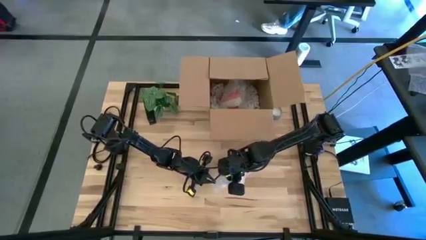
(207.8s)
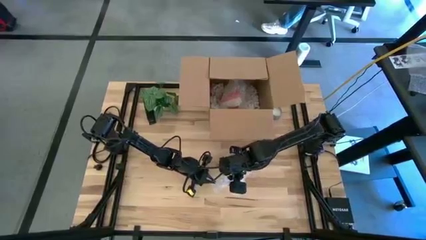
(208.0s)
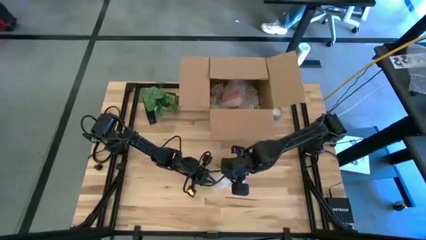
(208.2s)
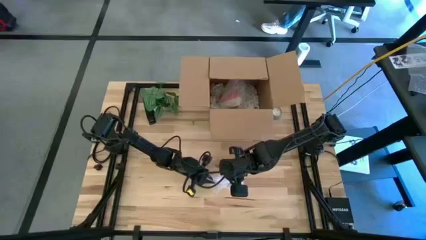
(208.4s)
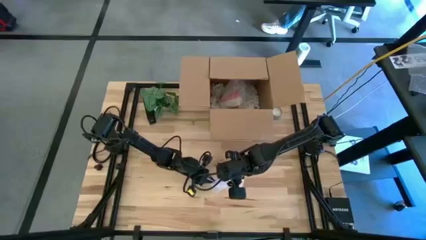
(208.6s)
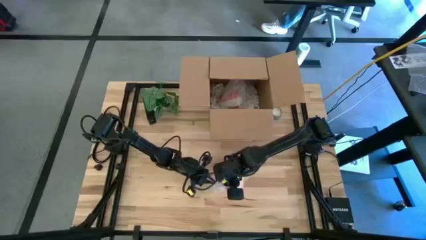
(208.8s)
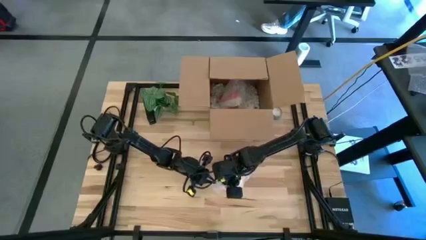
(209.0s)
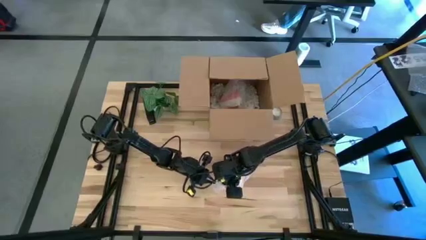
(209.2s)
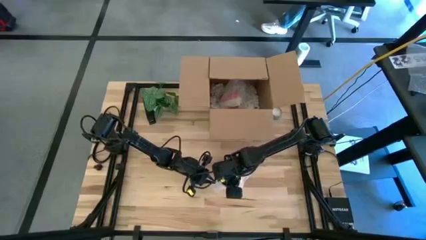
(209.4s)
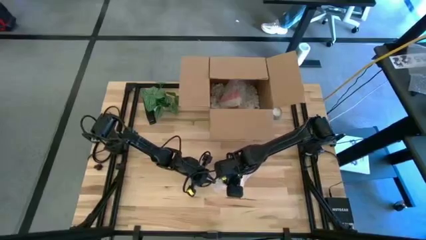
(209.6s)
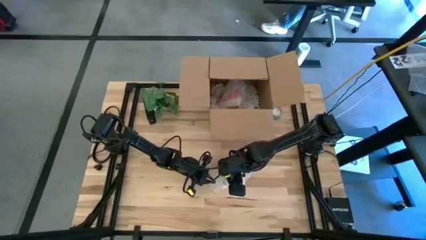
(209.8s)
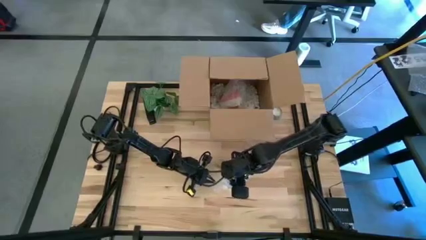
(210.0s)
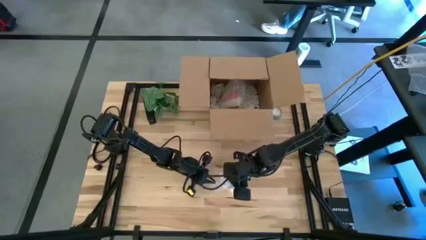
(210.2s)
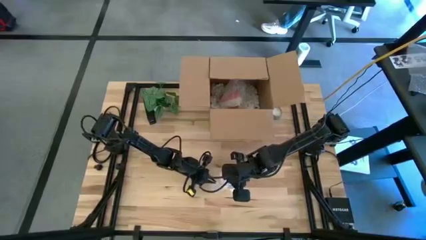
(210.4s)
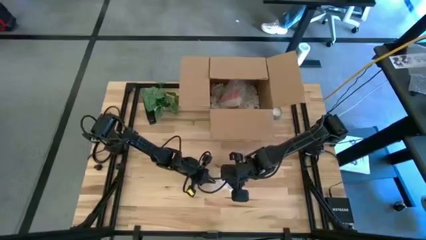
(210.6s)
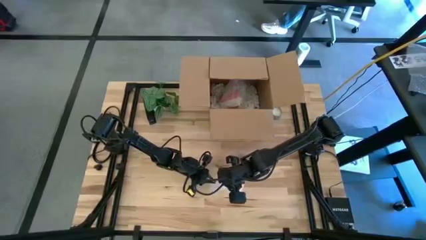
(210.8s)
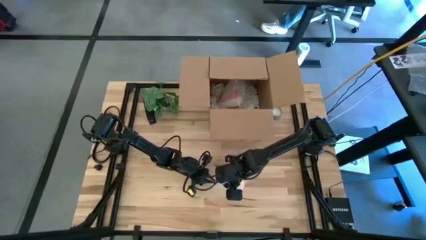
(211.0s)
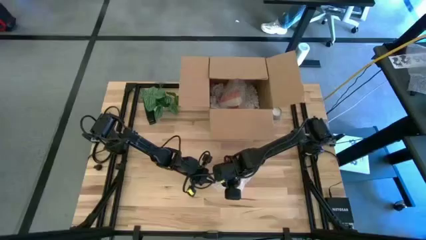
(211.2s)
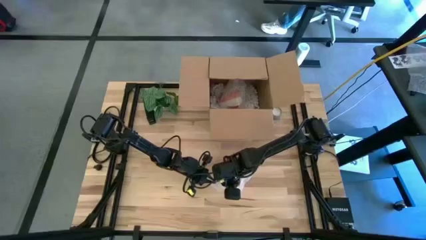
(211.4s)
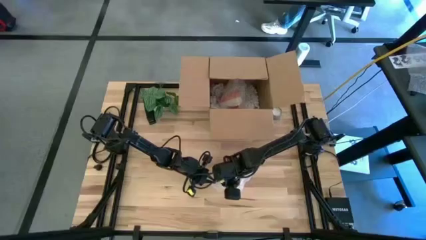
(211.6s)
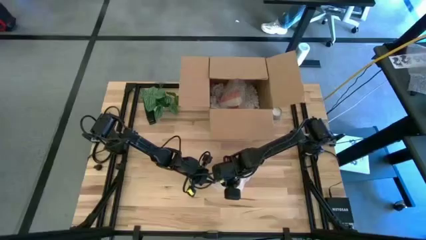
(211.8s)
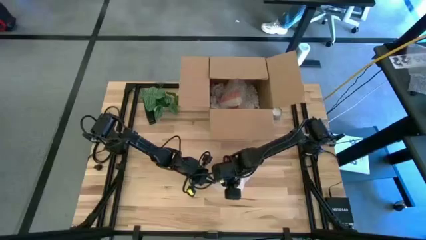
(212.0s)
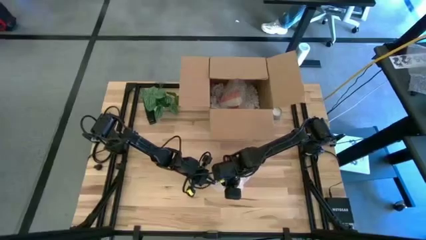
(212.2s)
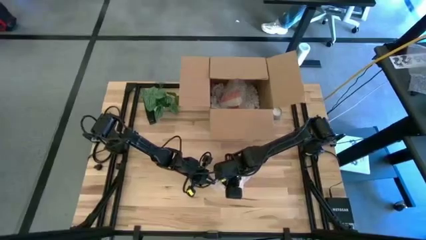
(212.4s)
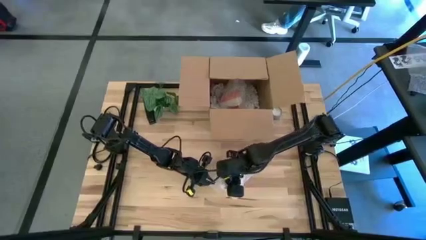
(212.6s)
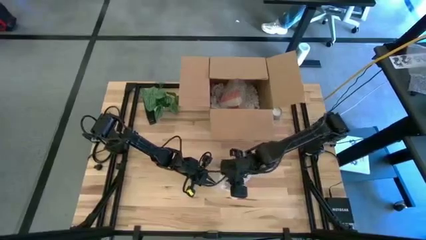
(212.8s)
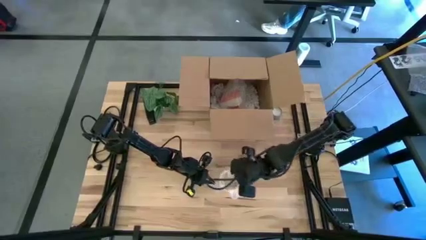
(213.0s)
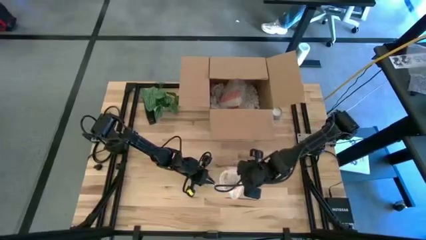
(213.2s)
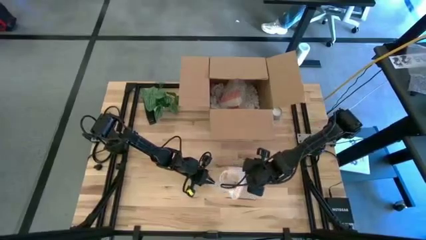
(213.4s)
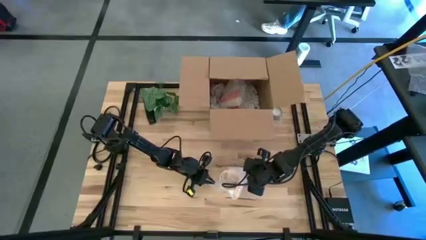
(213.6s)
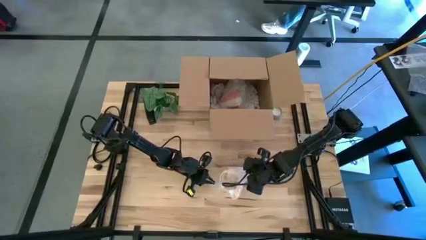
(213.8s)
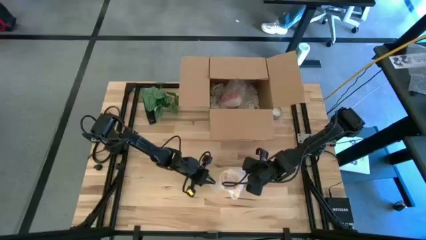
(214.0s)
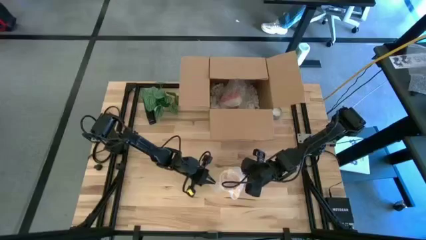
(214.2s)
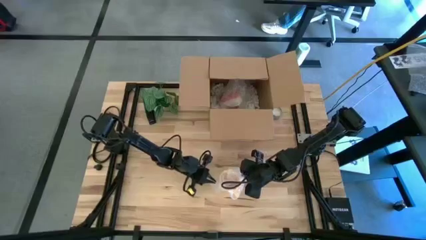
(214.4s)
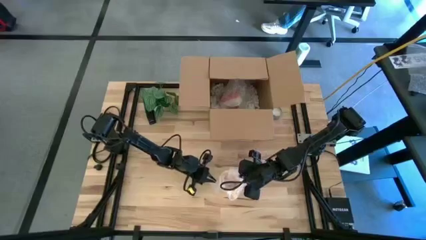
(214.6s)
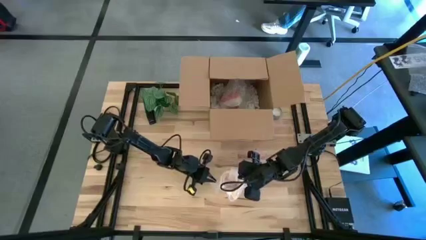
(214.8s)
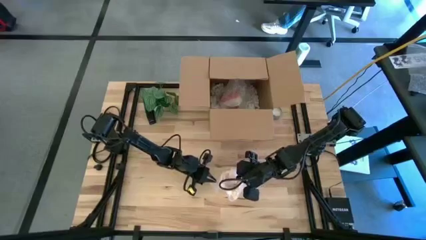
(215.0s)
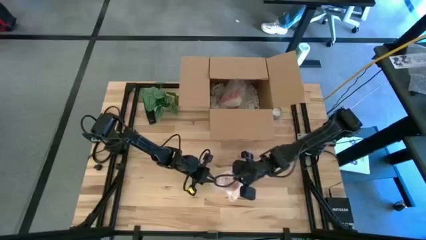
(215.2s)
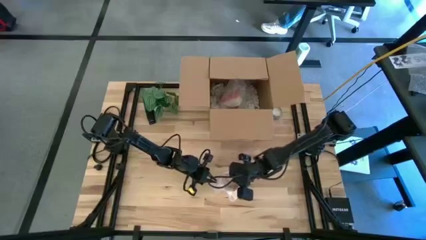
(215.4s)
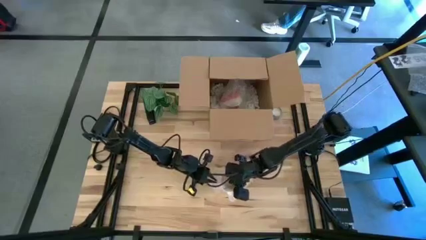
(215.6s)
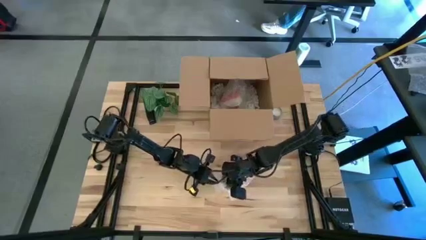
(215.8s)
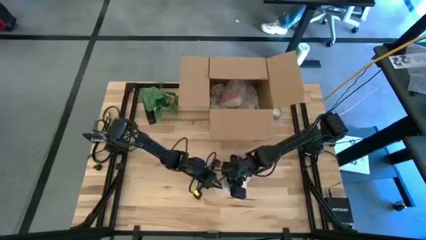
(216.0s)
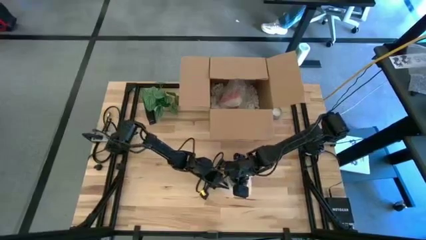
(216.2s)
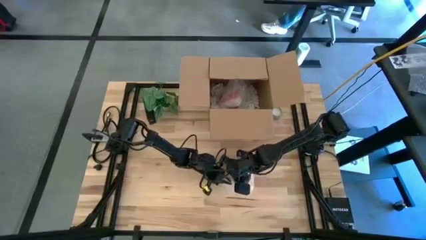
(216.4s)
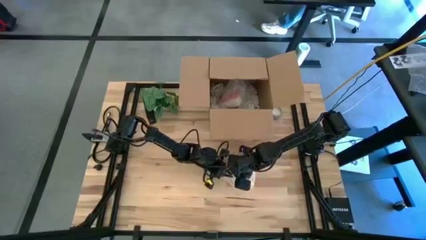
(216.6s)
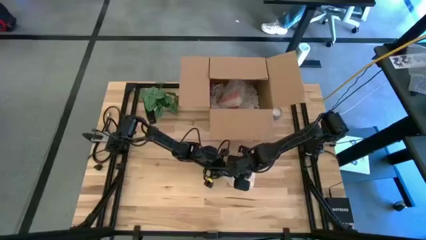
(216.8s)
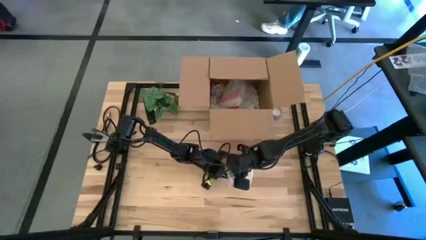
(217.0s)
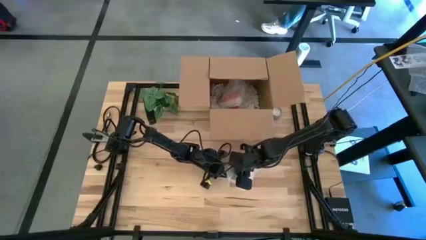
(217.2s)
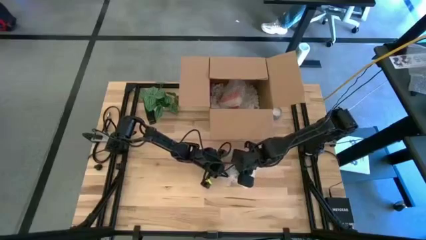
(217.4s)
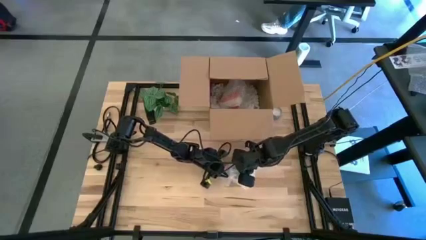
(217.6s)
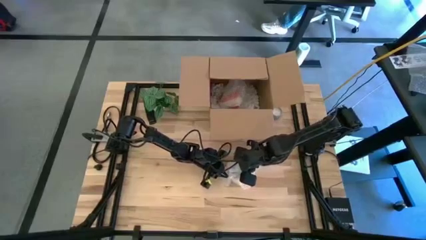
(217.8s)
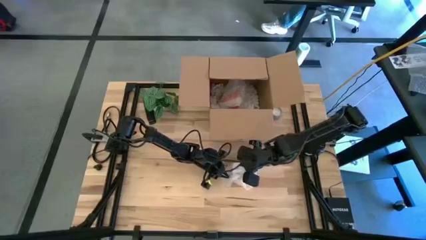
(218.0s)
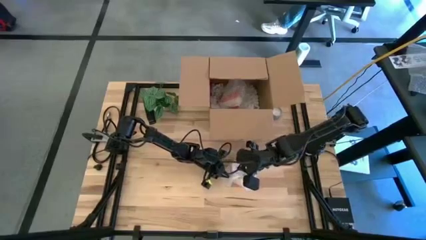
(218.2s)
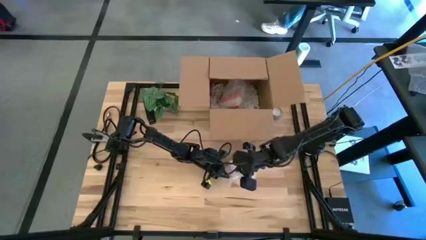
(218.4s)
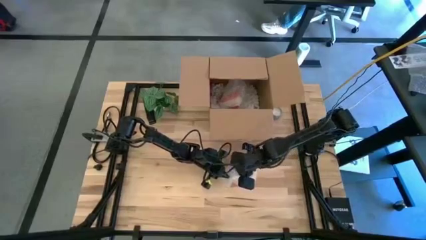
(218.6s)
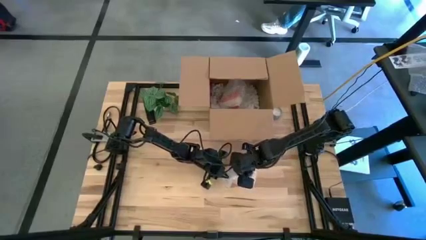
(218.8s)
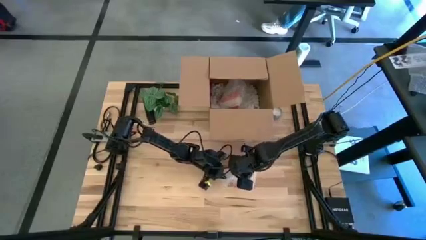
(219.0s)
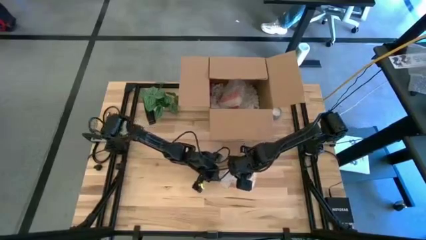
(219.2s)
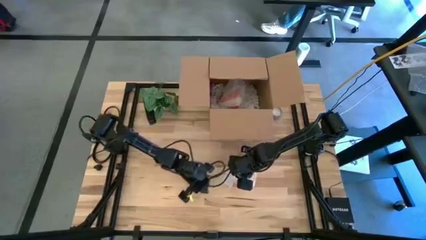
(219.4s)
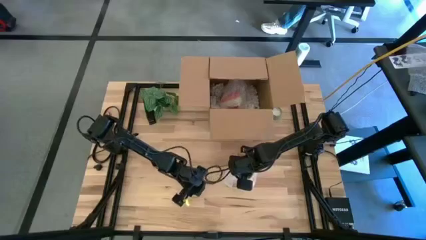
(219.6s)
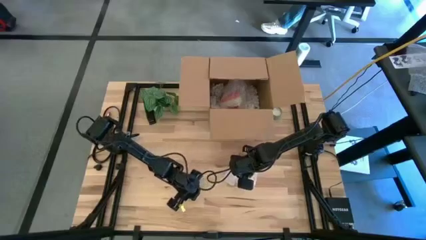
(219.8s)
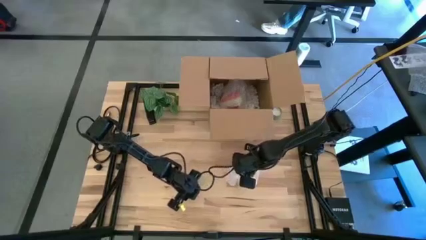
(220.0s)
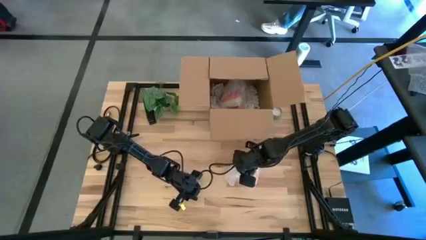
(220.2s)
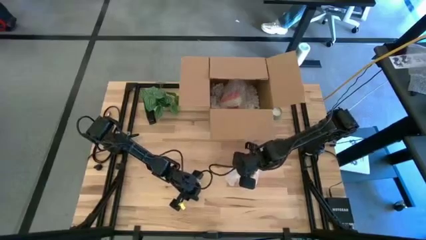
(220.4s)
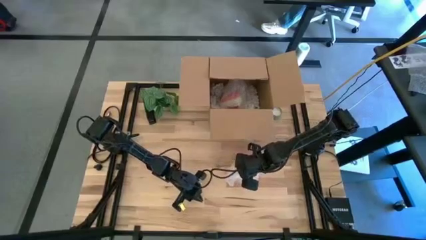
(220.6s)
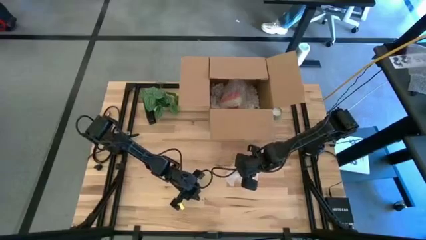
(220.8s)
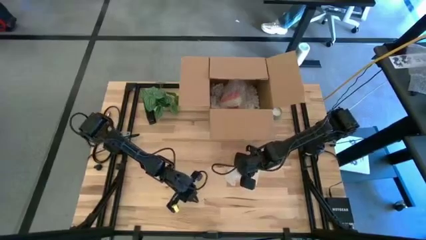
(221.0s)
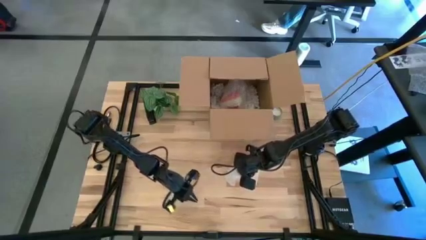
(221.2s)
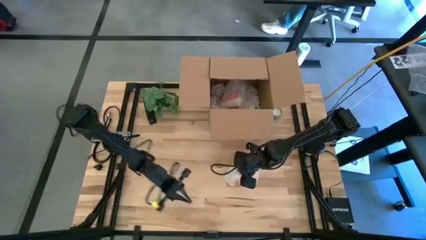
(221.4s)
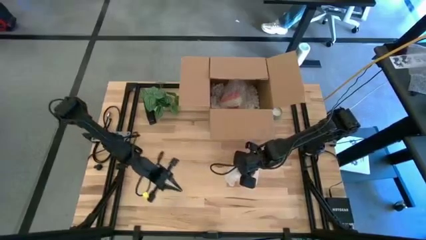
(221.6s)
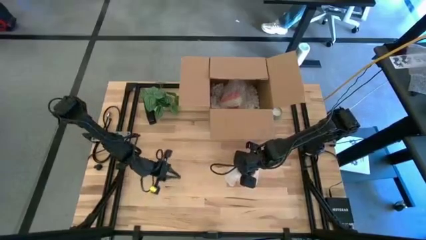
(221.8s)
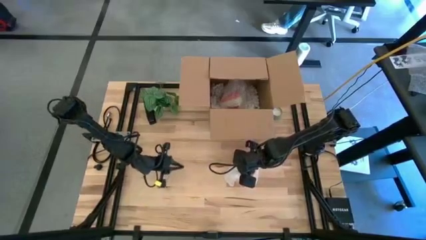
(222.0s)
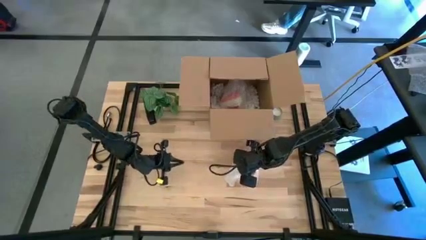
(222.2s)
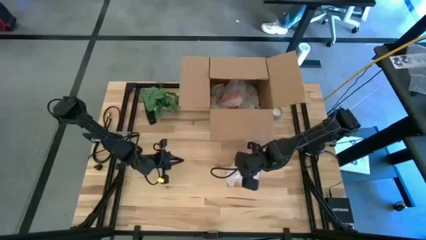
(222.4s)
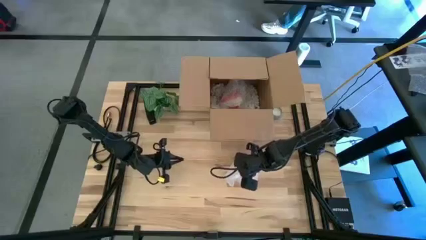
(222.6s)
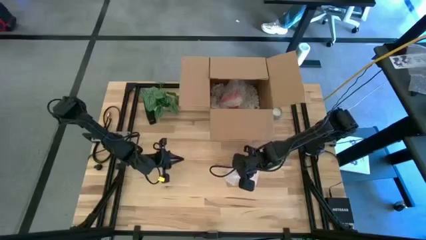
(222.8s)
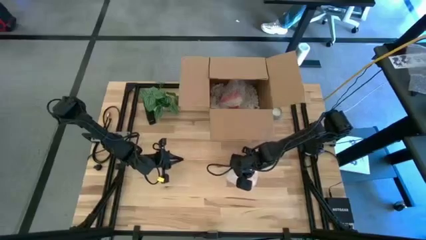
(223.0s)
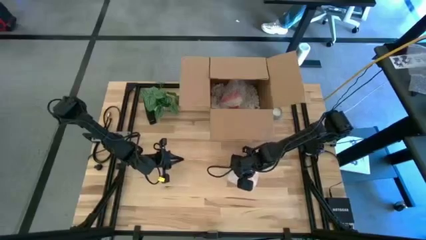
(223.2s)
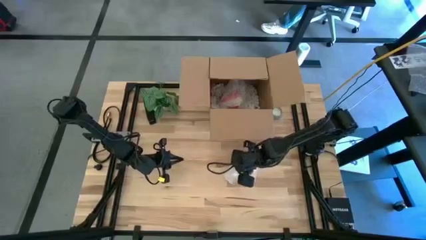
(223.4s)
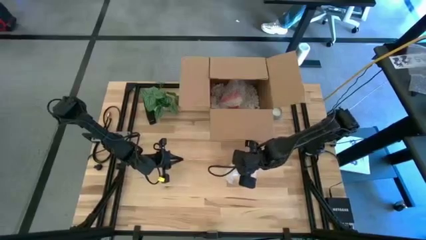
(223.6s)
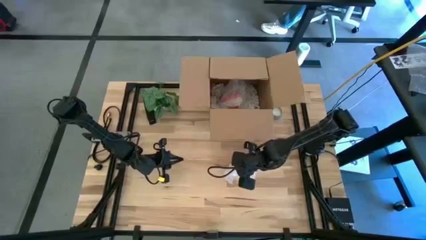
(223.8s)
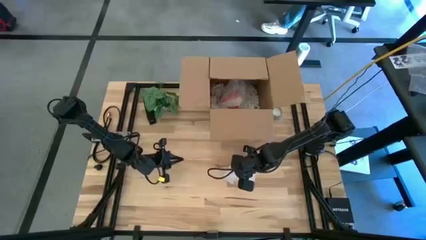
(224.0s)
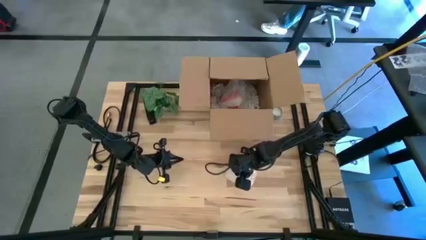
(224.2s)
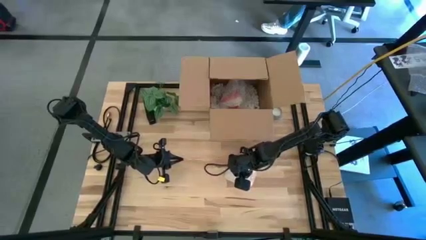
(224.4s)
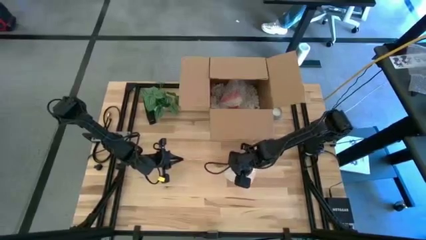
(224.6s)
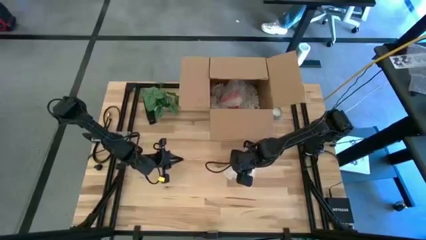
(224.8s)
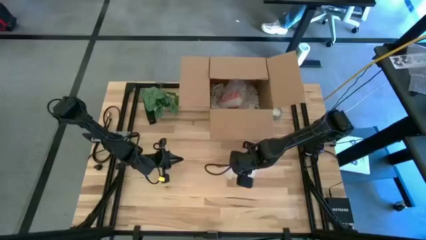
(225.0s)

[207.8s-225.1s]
Task: wrap mug
Wrap the yellow mug with the bubble wrap

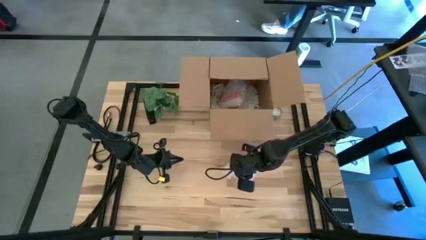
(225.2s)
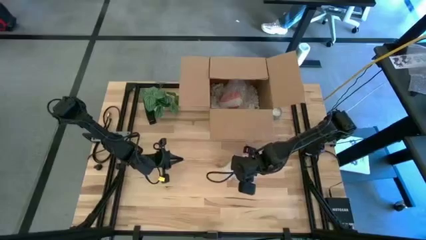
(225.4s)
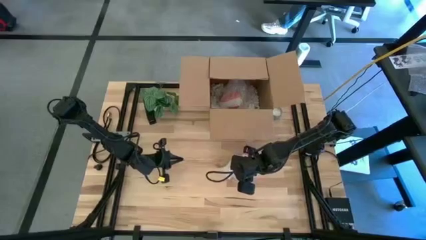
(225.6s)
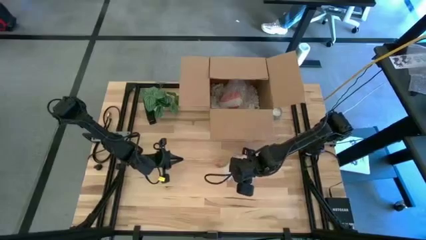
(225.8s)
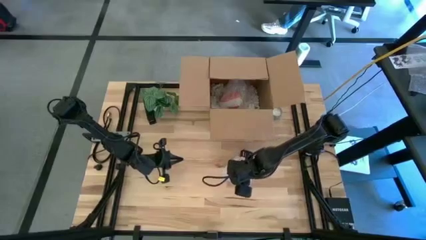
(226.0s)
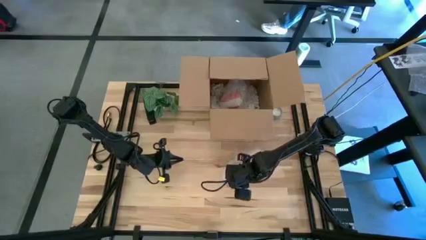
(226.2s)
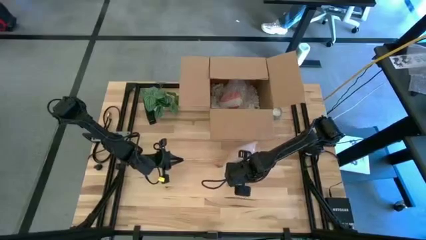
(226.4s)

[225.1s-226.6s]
Put the wrapped yellow mug into the cardboard box
